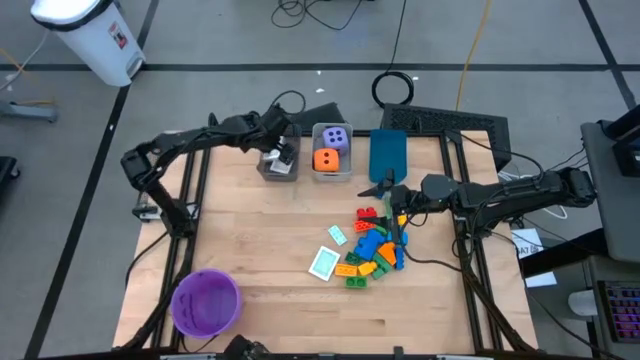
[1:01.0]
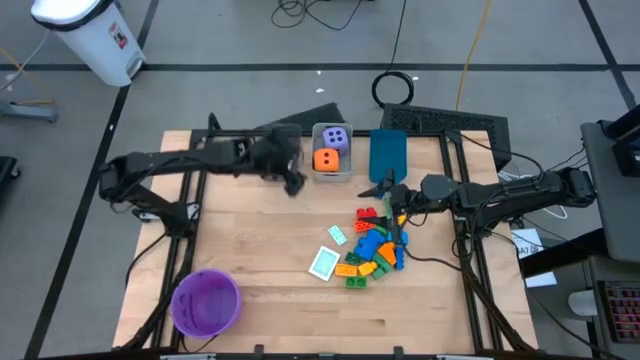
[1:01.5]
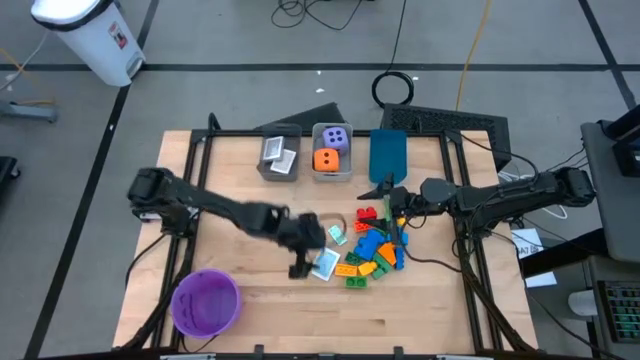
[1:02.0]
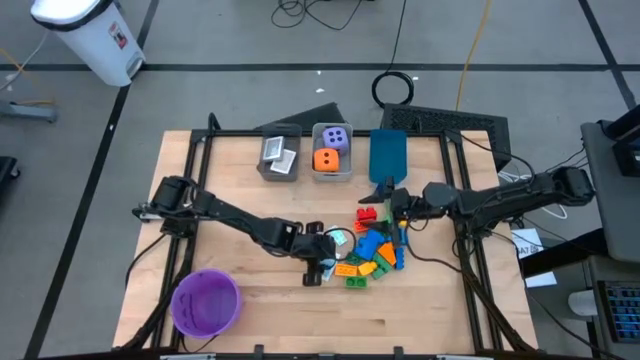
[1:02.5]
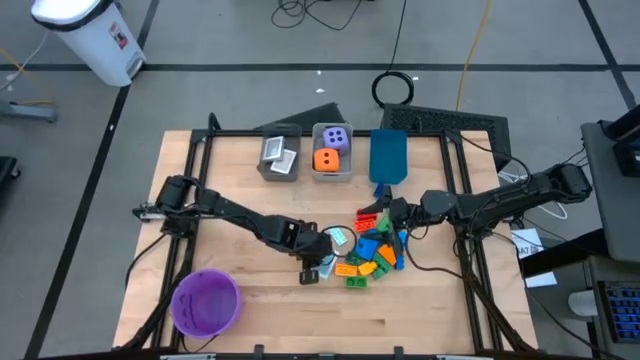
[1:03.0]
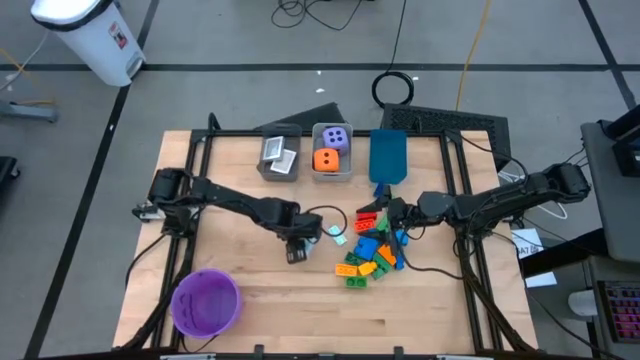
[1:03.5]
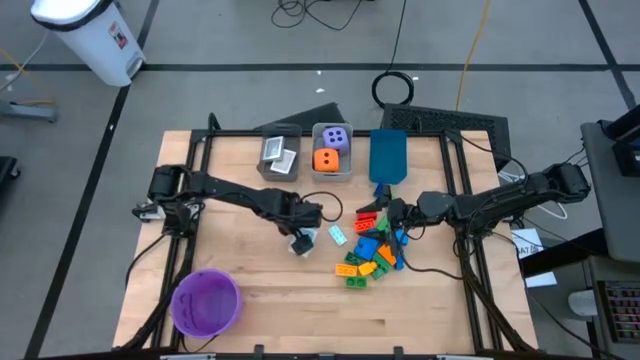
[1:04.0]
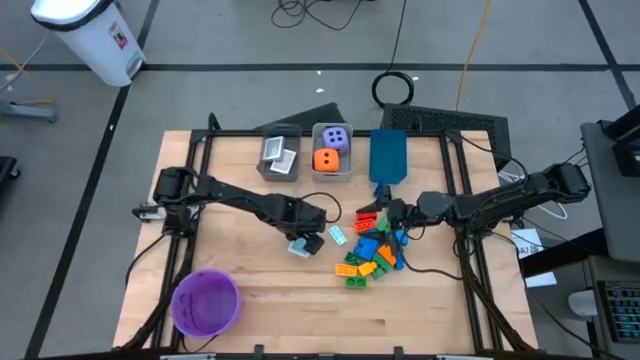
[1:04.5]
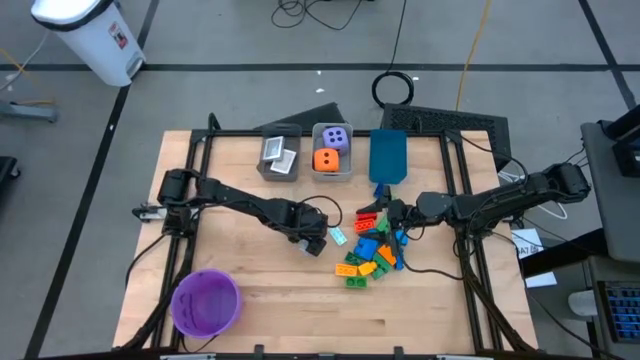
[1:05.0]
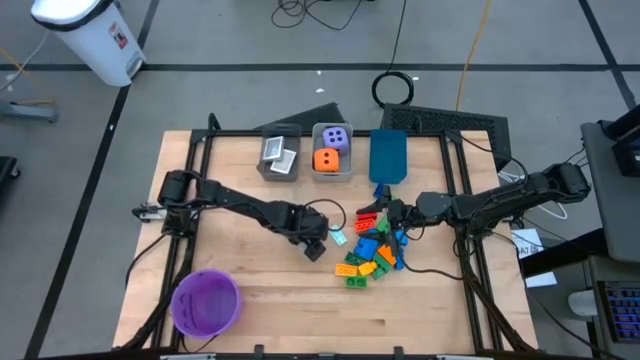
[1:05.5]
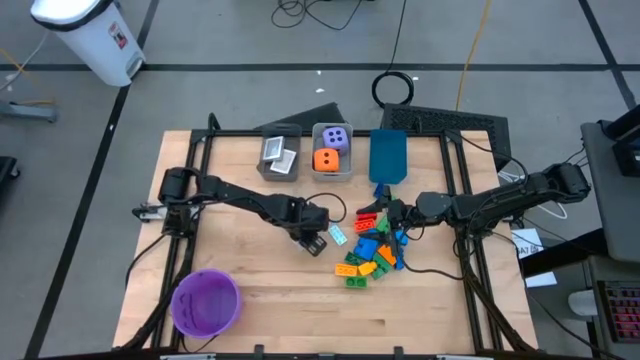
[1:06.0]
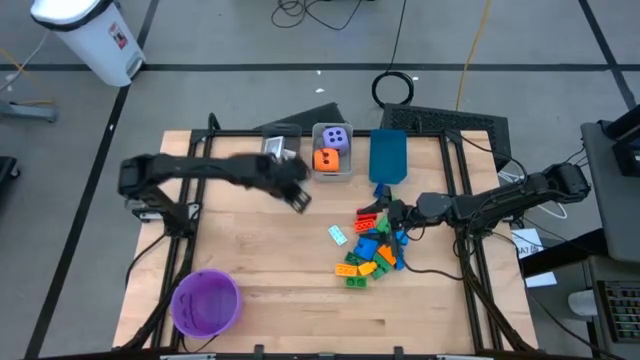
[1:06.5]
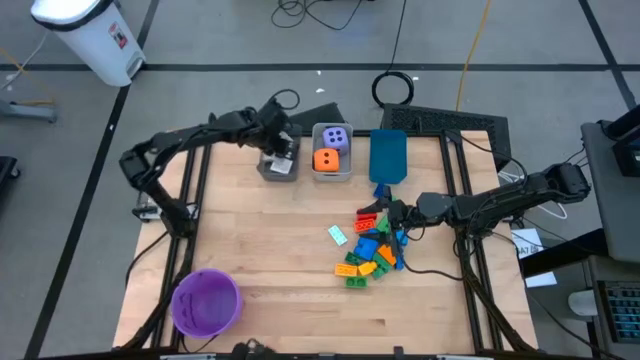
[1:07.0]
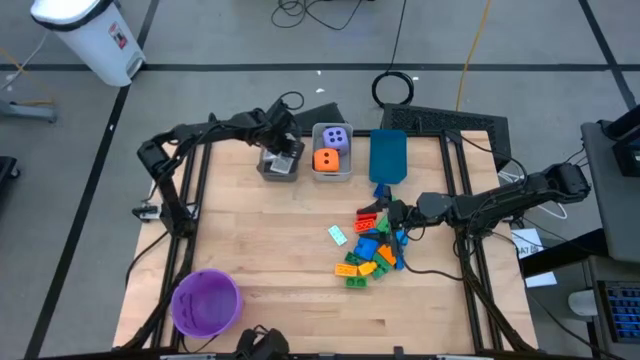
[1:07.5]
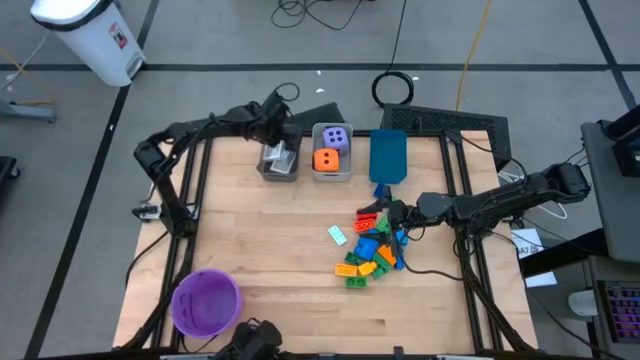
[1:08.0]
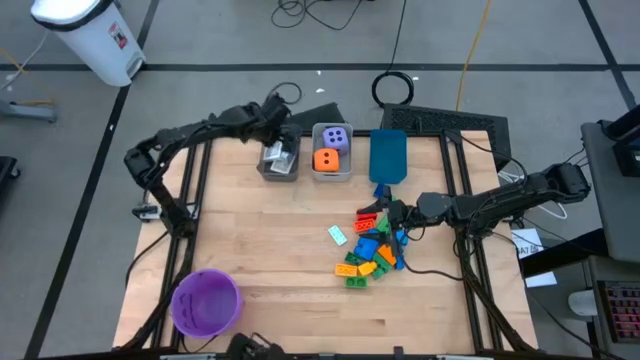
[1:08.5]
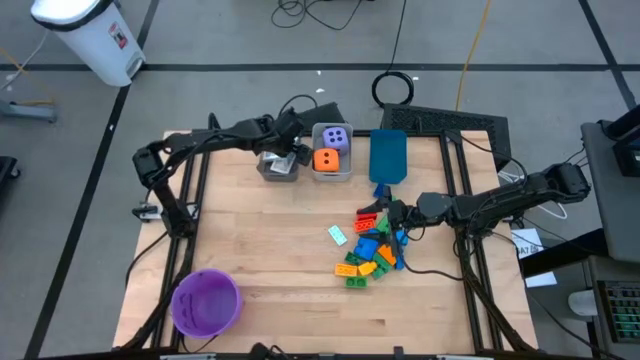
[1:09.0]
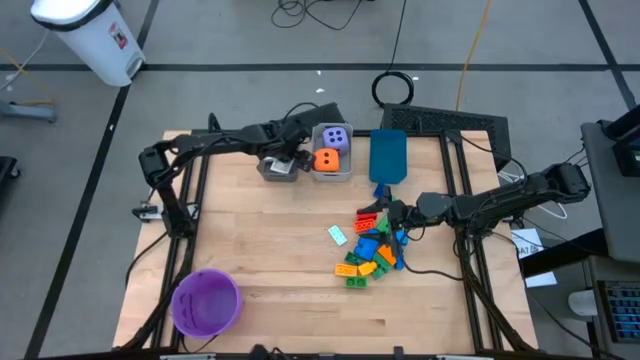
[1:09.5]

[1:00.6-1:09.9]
Task: Pick & Place Toys
Put the blue deck of cards into the black bin

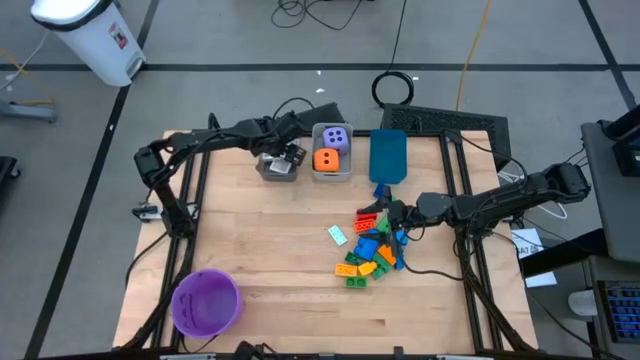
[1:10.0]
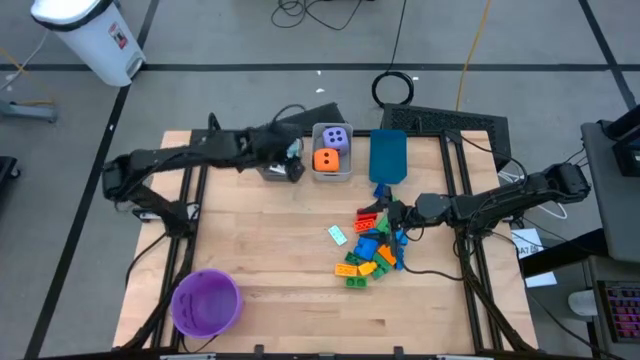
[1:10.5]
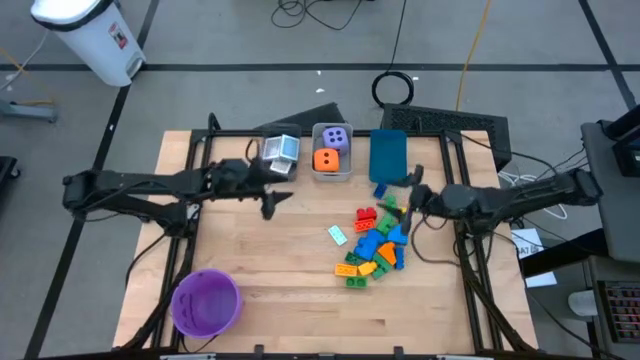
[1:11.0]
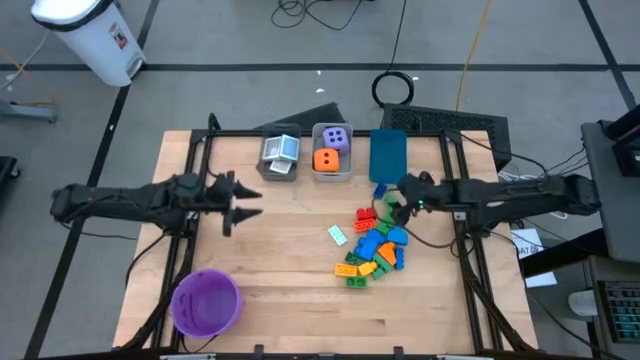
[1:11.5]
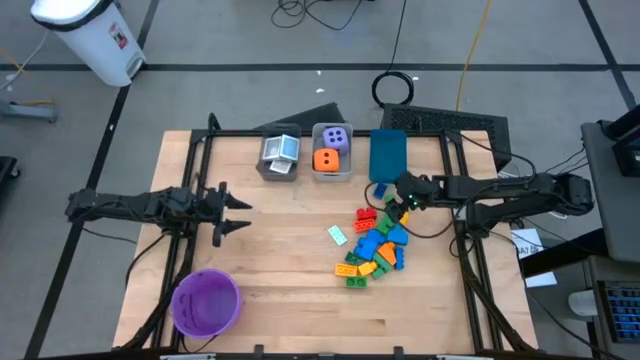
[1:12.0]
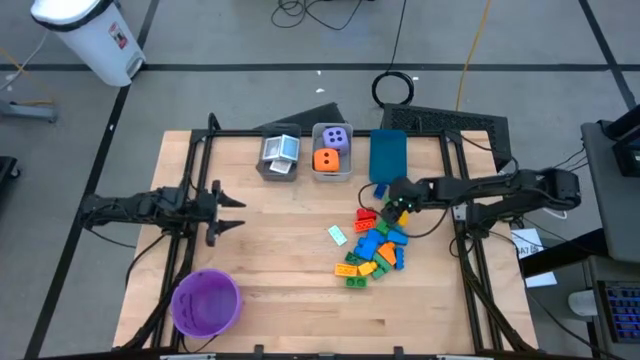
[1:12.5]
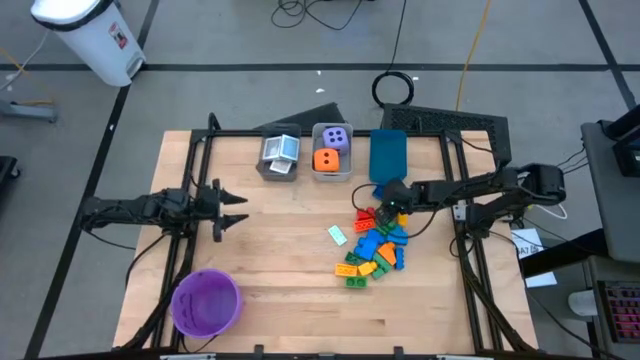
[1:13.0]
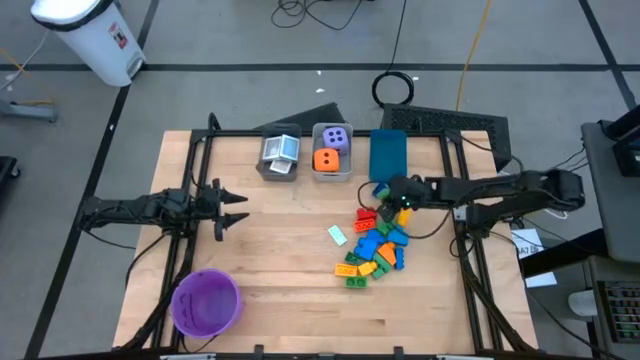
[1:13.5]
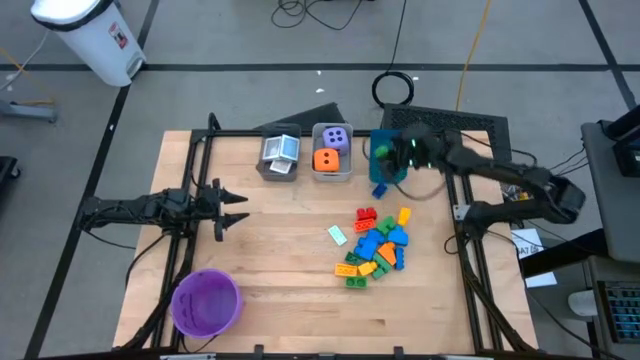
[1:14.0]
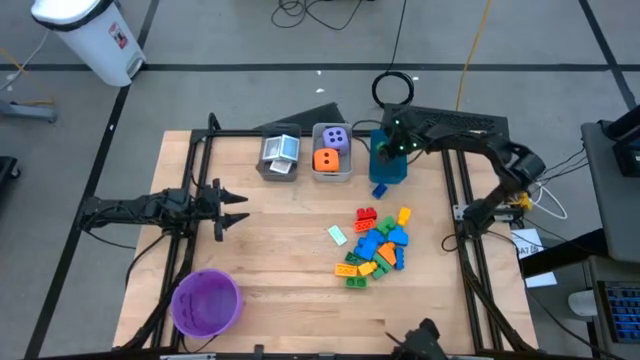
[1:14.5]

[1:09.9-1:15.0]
Put the green game piece into the blue bin

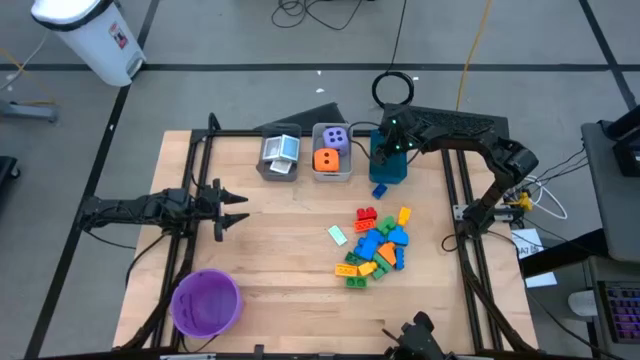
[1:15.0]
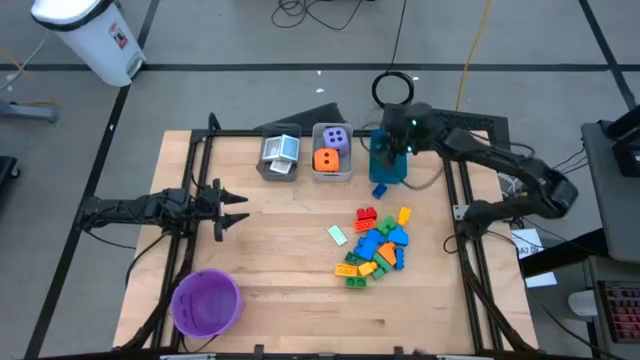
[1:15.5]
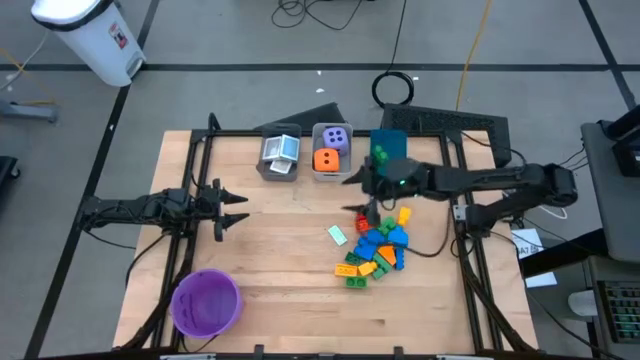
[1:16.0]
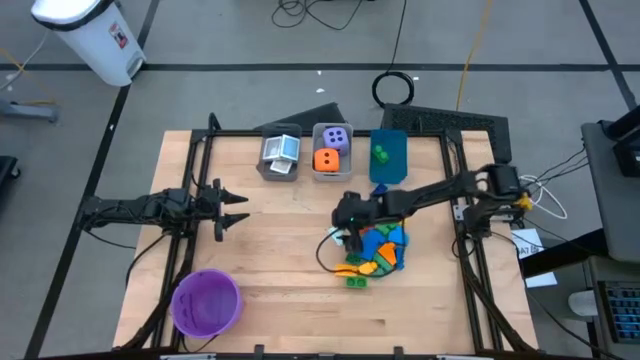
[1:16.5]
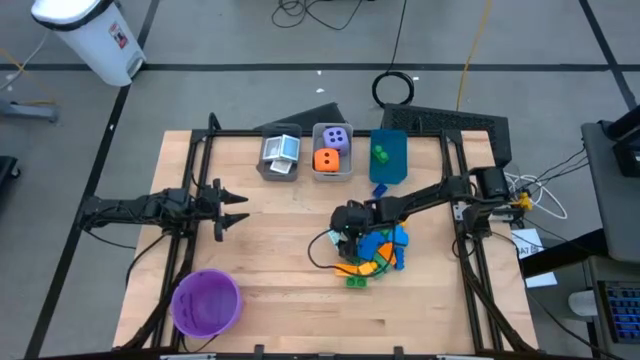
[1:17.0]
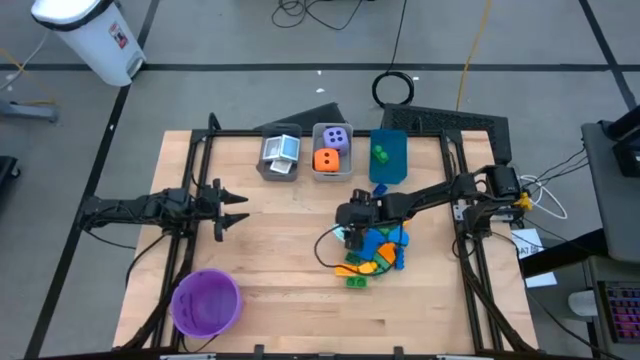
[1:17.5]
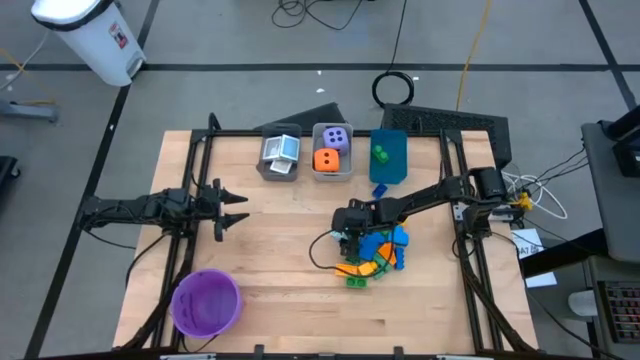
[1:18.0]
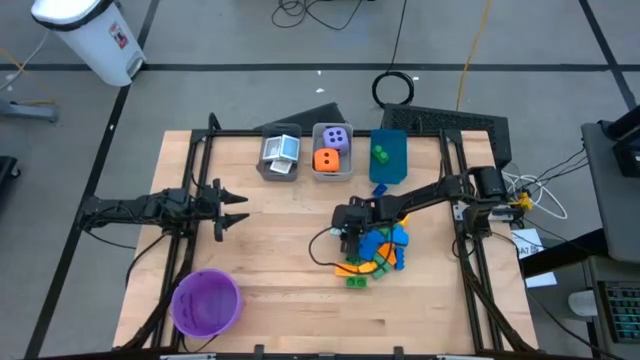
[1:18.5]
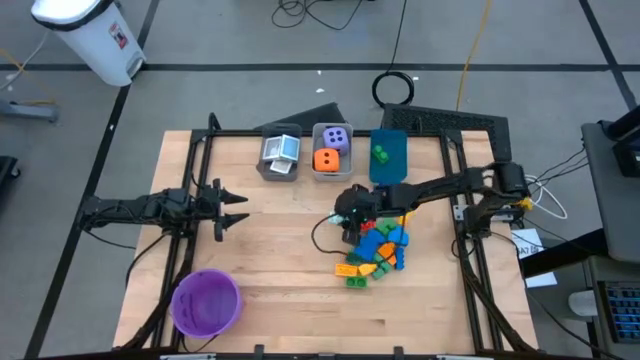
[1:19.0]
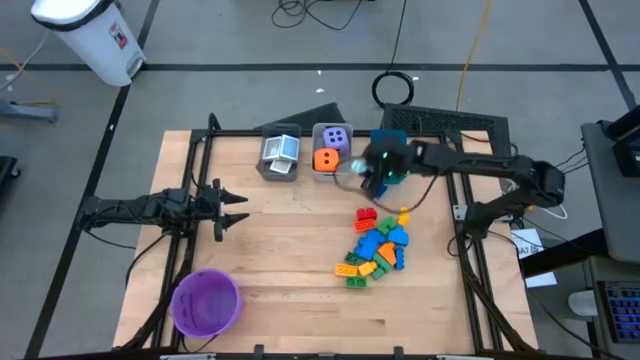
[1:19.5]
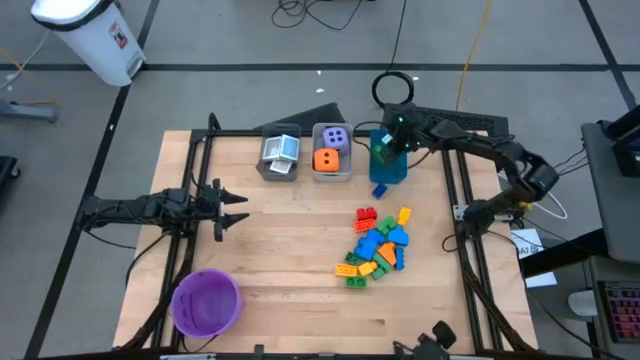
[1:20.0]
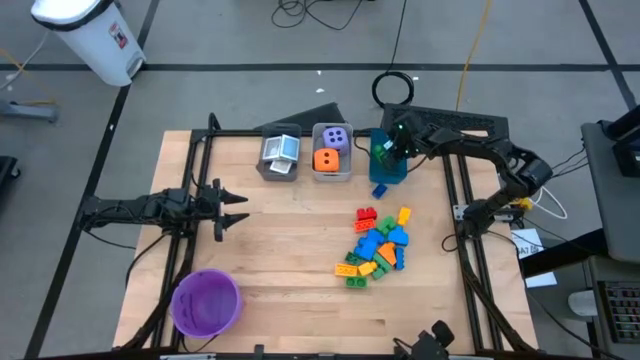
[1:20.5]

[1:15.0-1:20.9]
Put the white game piece into the blue bin
